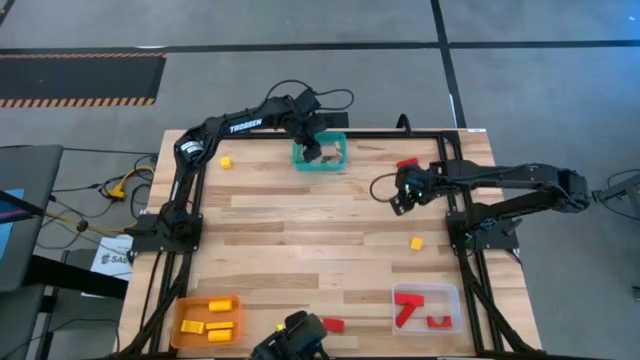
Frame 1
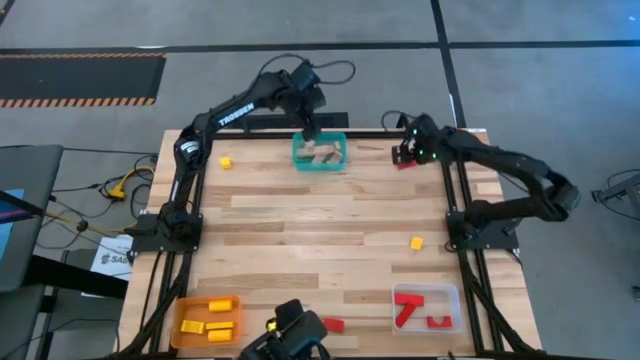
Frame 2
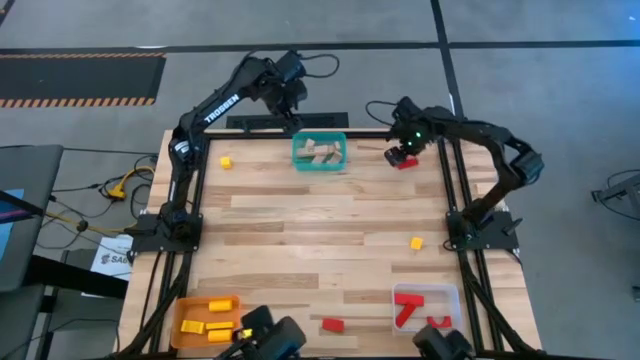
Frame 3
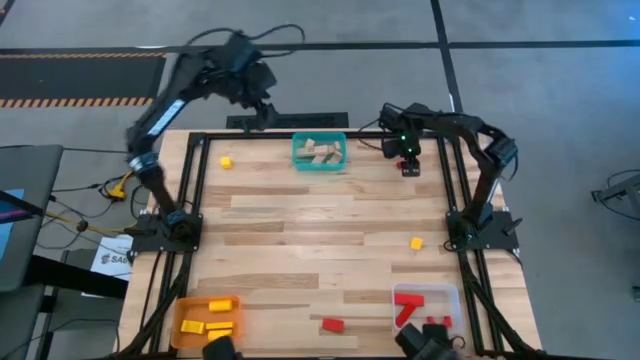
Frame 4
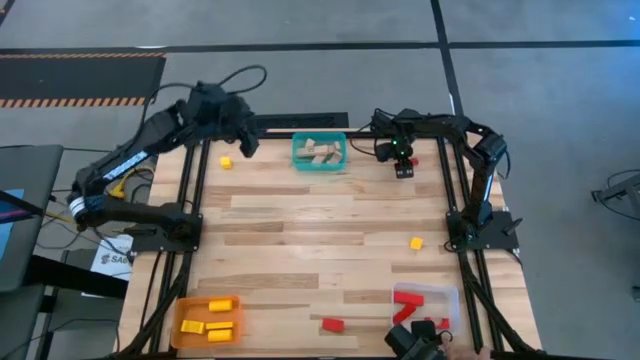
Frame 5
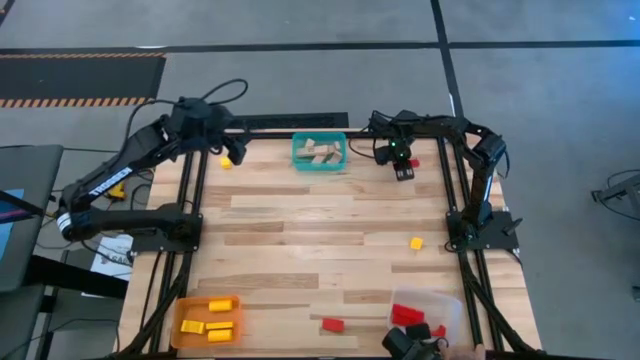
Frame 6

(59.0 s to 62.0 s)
Task: Sort & place blocks by color
Put the red block into the transparent bin

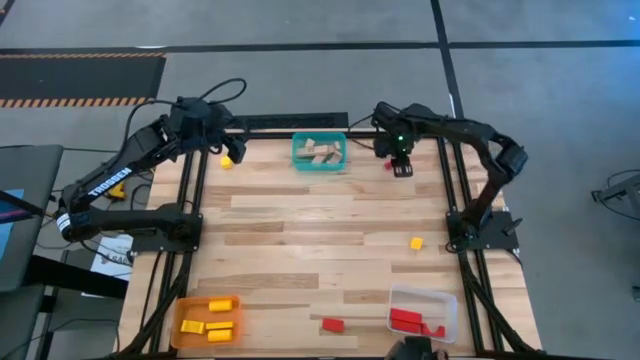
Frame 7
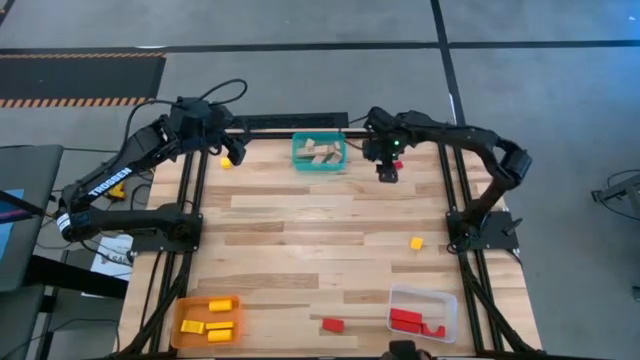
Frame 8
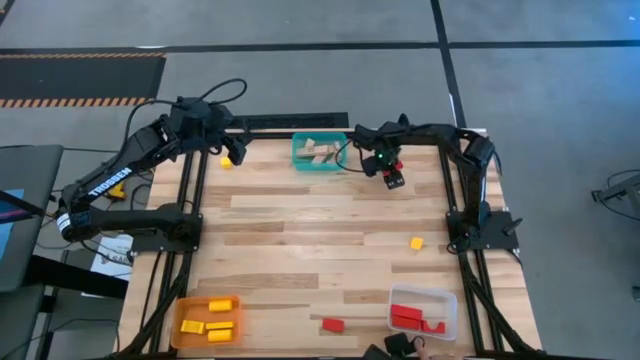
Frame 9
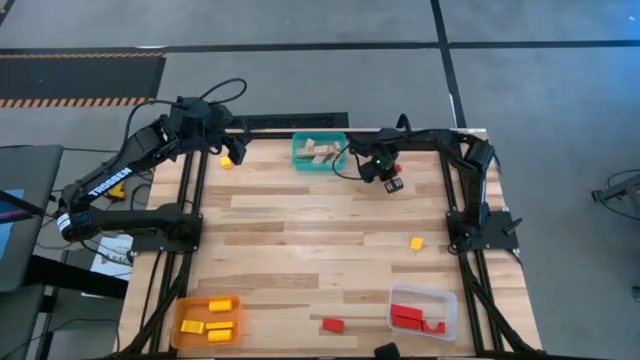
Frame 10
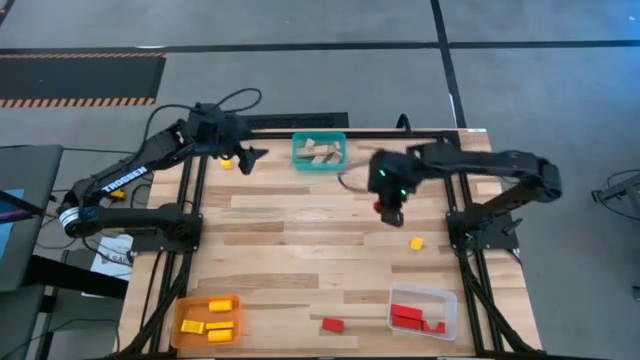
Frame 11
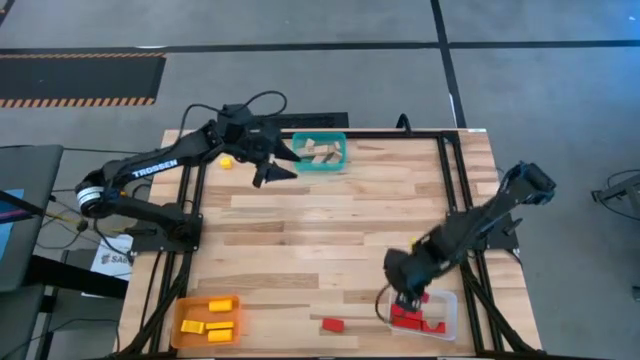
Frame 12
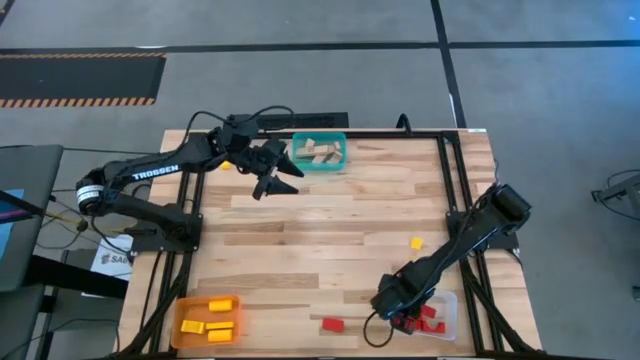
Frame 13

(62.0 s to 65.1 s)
Put the red block into the transparent bin

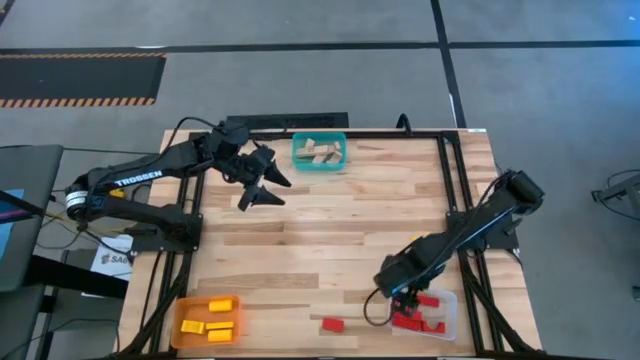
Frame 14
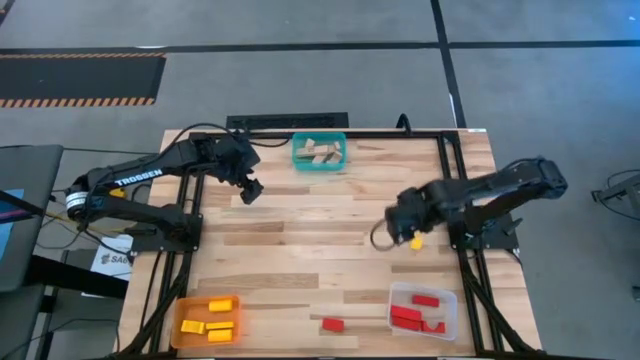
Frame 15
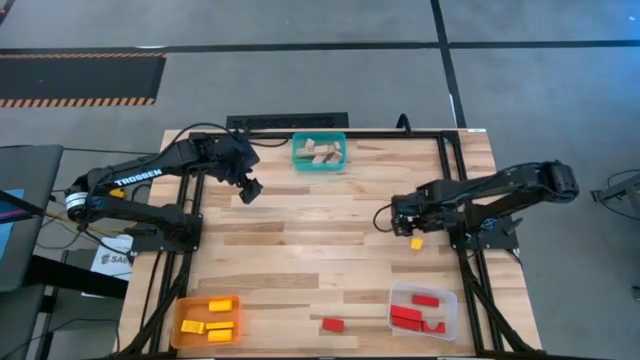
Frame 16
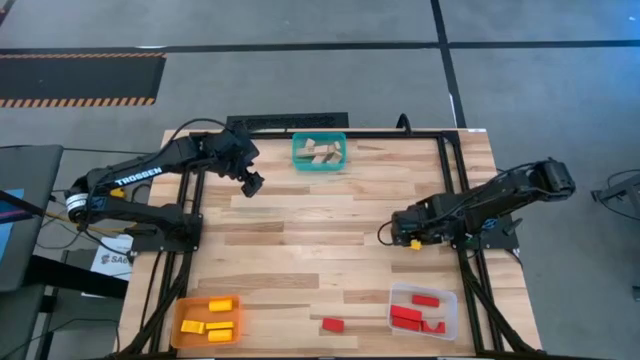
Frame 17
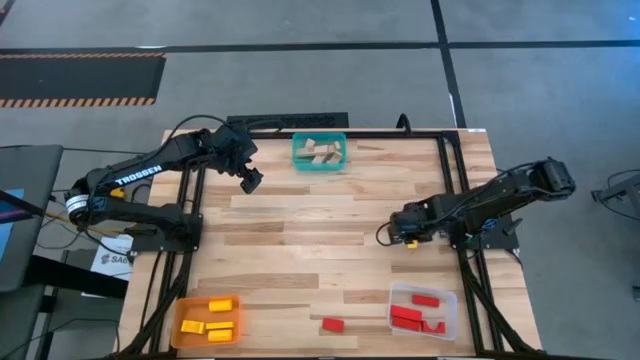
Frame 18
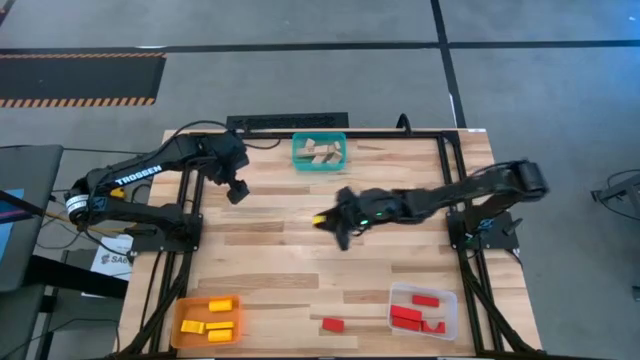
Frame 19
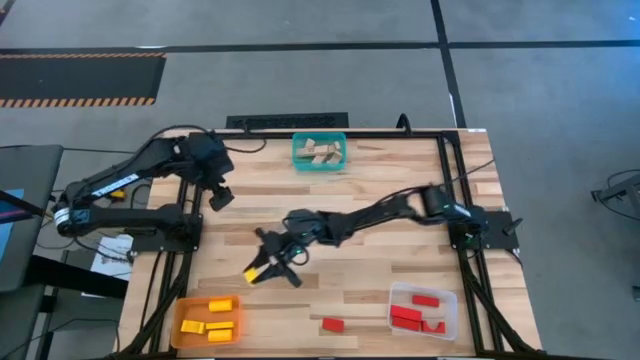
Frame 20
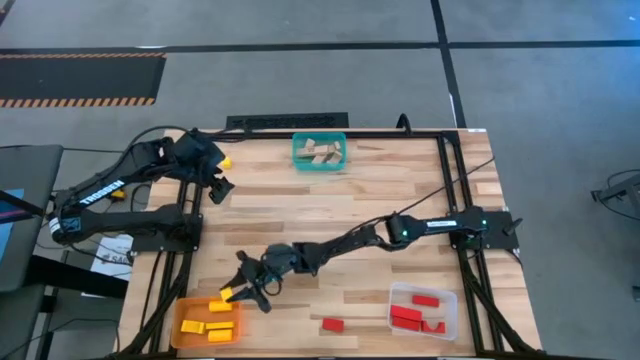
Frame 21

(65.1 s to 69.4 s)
Put the yellow block into the orange bin

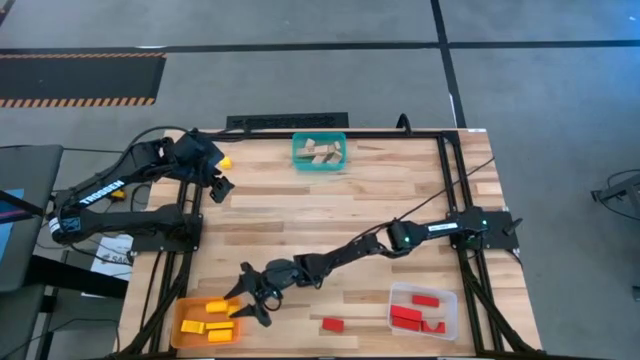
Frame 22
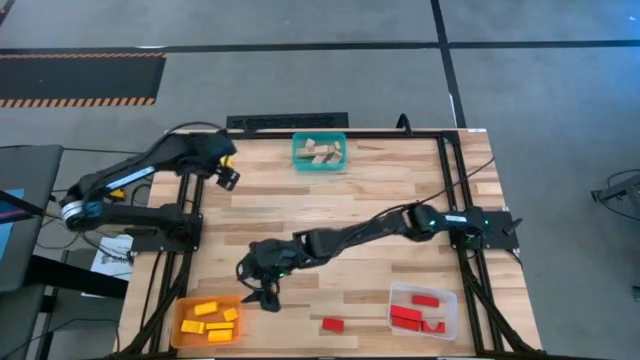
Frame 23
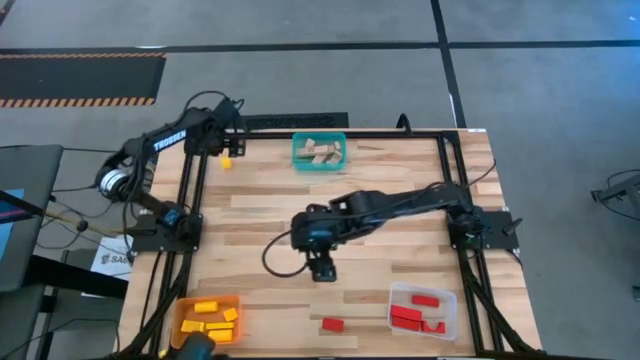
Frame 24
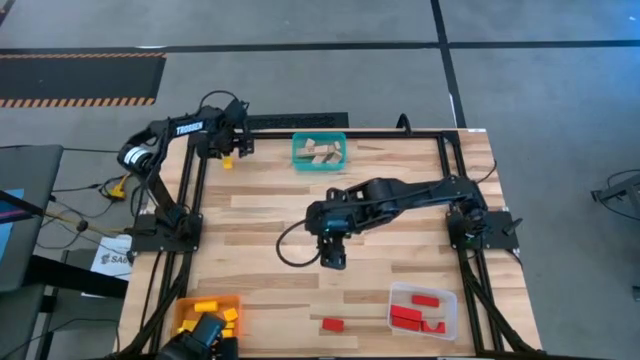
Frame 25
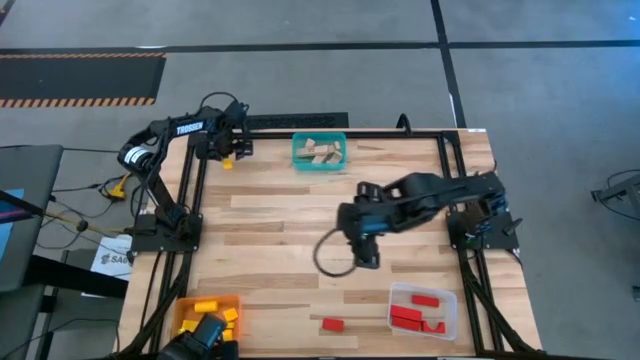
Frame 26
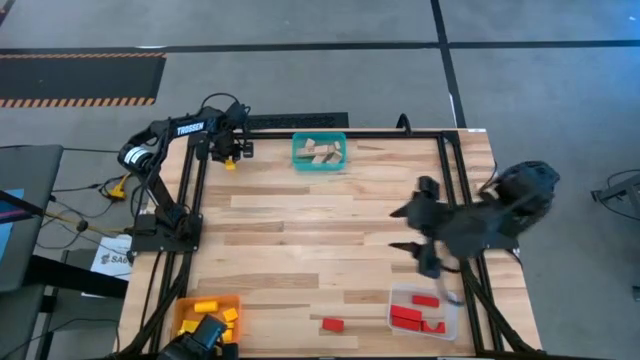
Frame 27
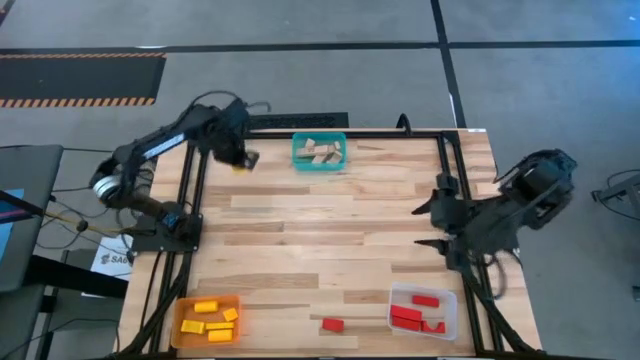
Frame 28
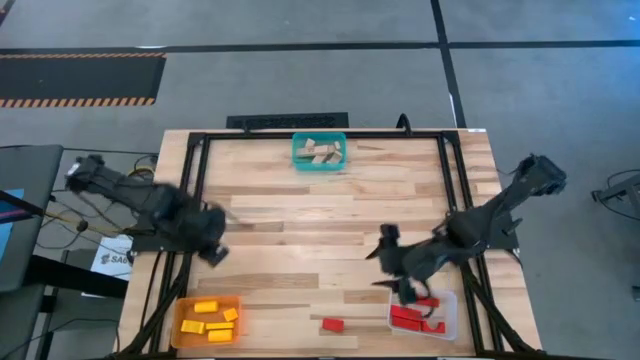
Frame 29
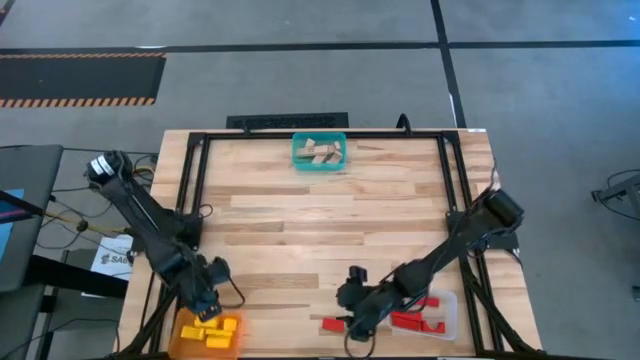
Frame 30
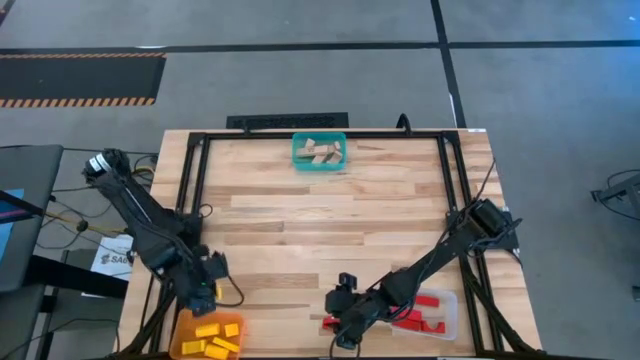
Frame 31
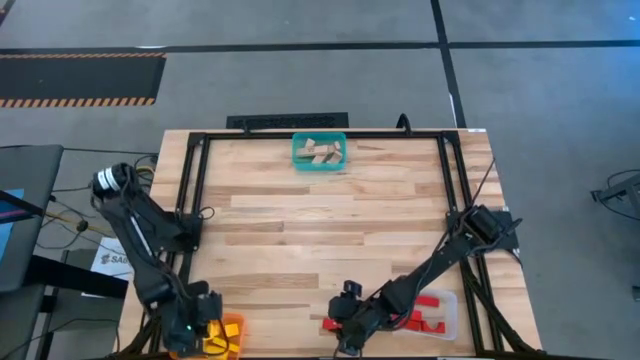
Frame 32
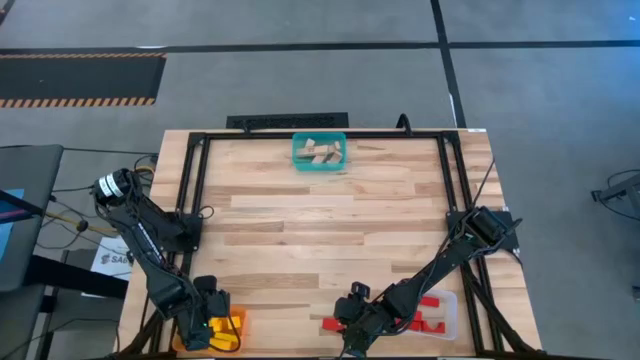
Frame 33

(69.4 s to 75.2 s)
Put the yellow block into the orange bin

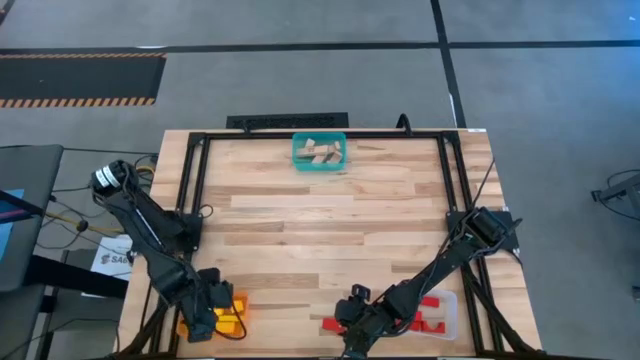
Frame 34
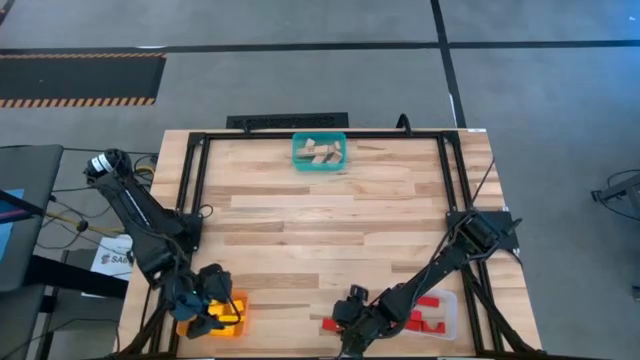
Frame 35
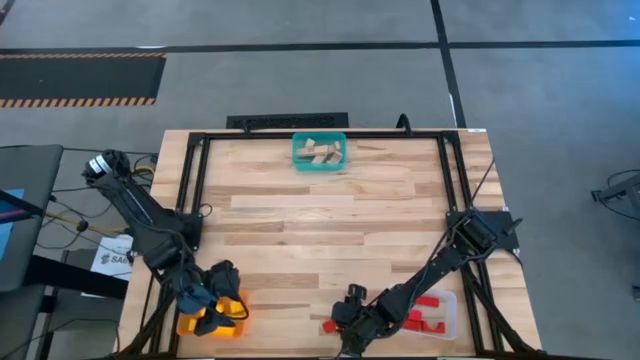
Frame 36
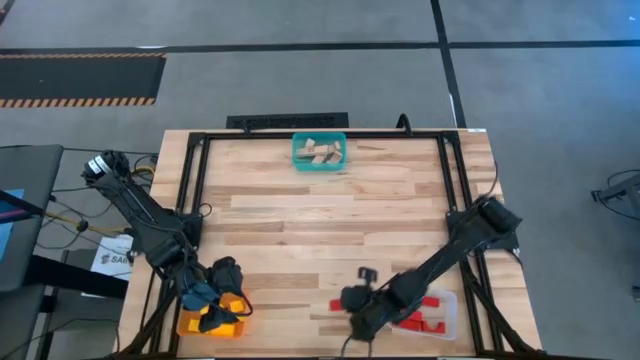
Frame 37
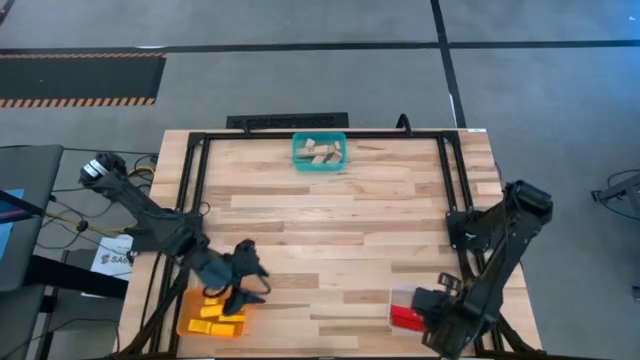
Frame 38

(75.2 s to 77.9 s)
Put the red block into the transparent bin

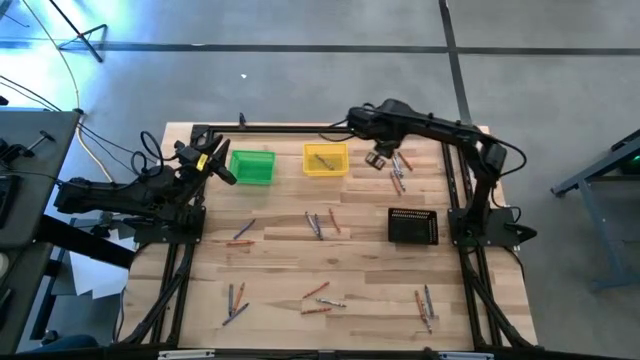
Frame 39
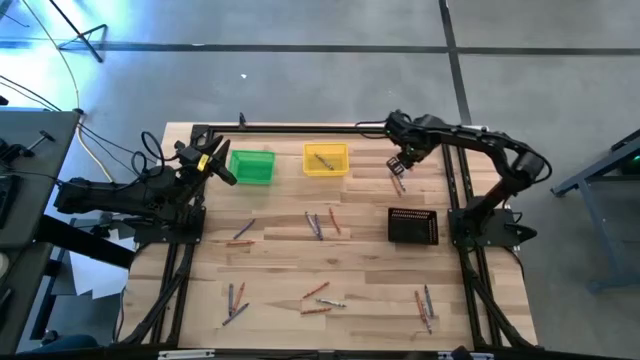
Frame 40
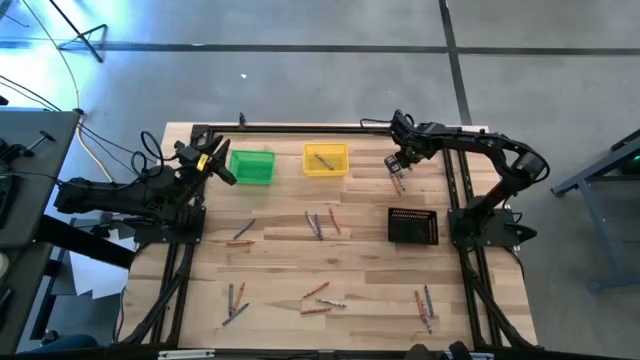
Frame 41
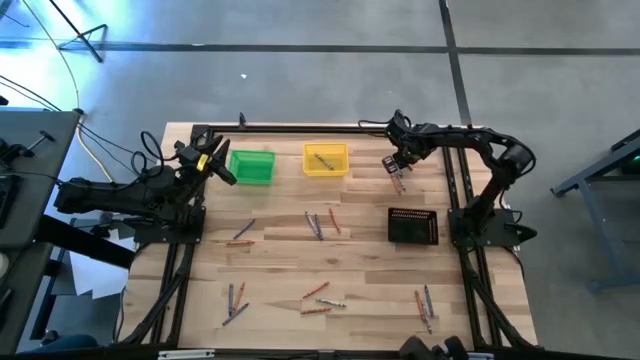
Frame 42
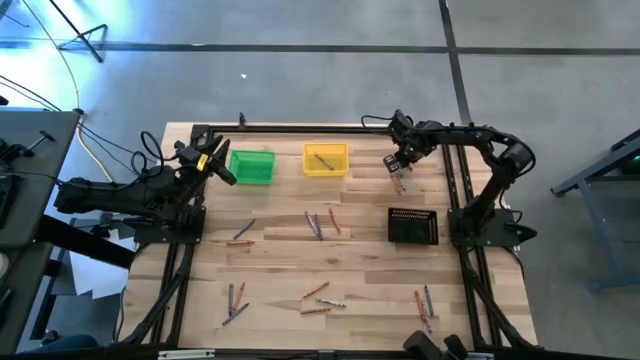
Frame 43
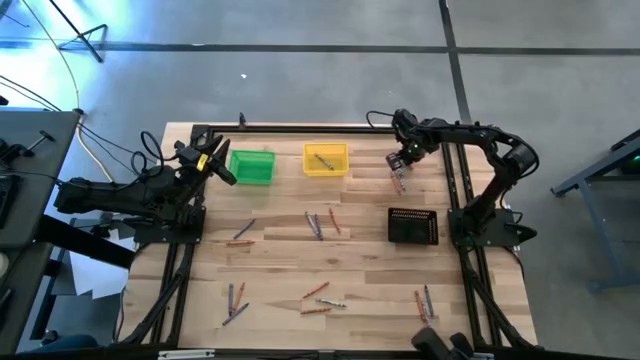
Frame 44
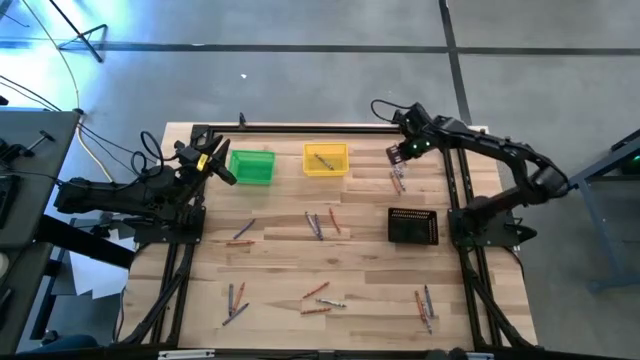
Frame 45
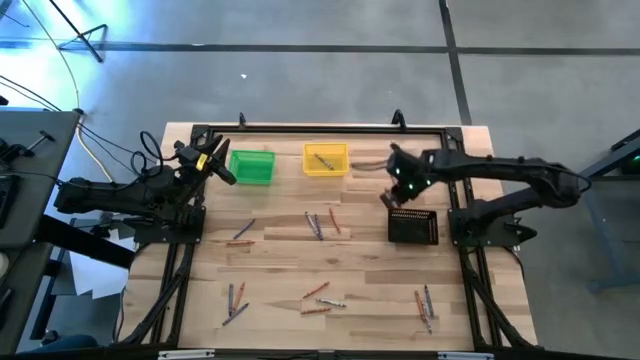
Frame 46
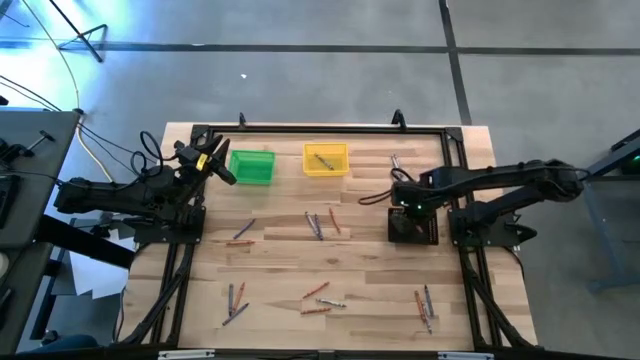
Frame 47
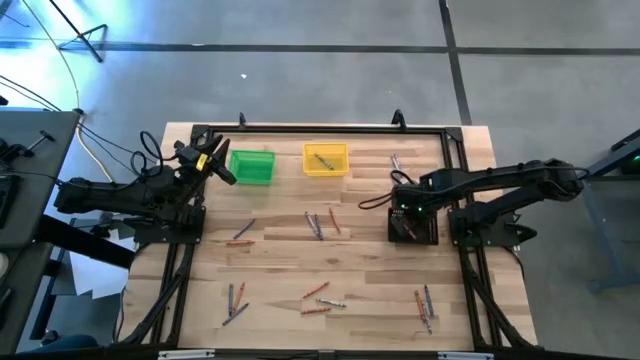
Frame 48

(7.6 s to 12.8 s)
Task: Sort crayons
Put the orange crayon into the black bin
